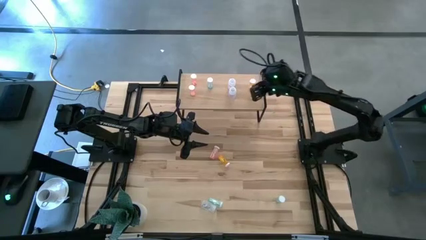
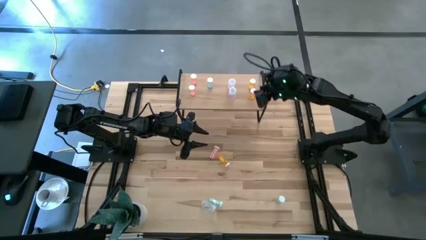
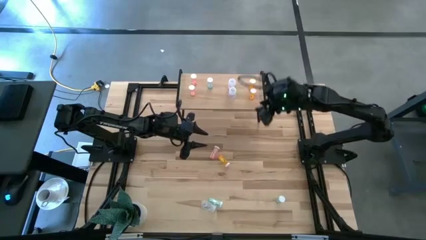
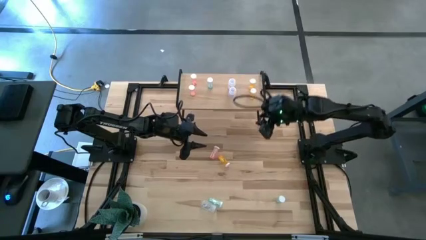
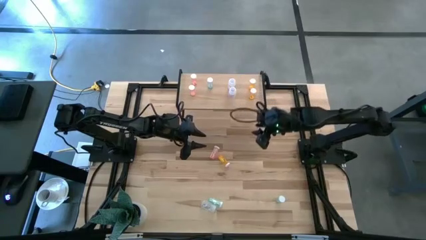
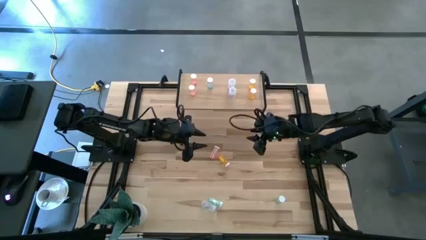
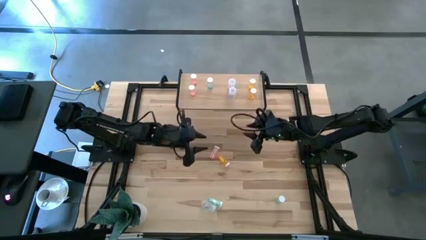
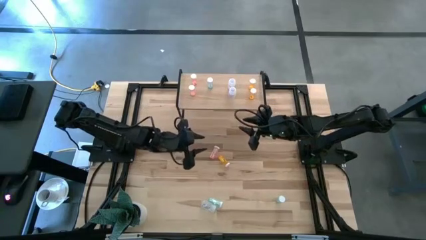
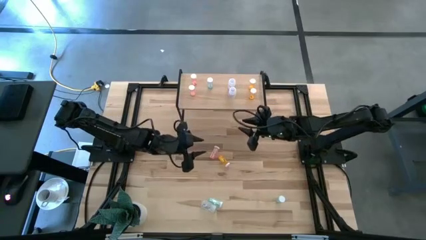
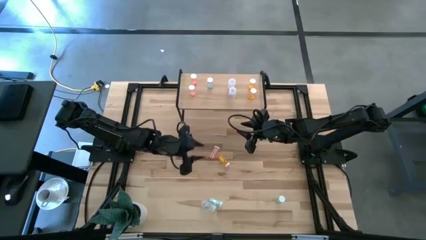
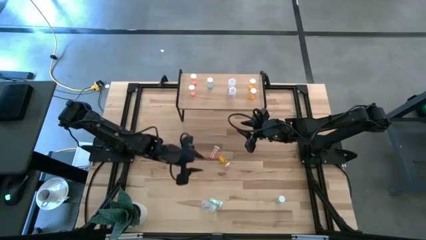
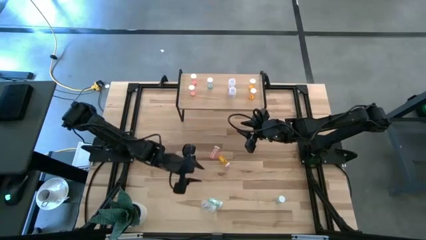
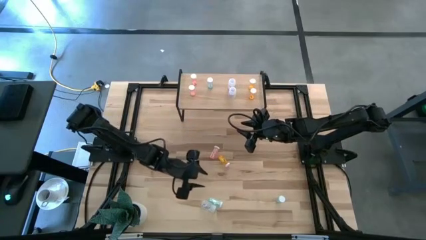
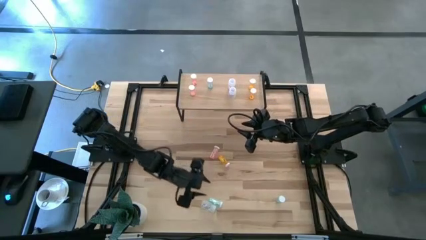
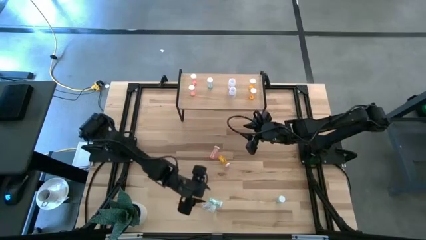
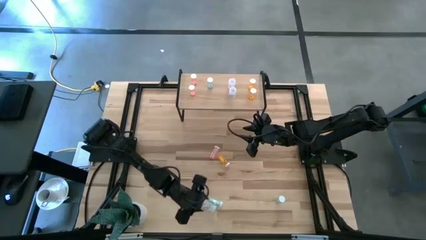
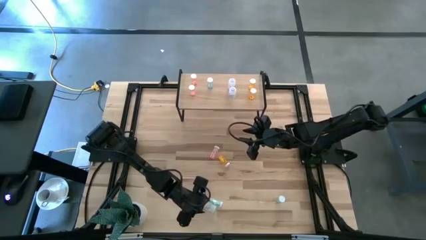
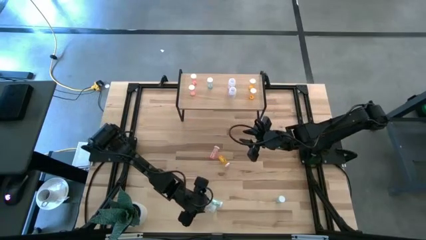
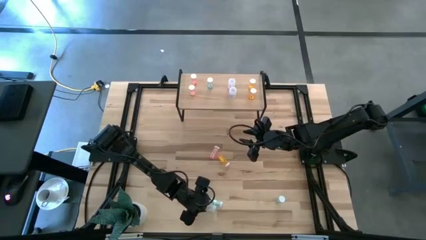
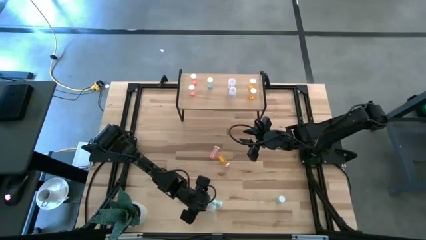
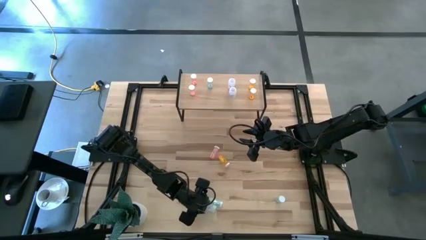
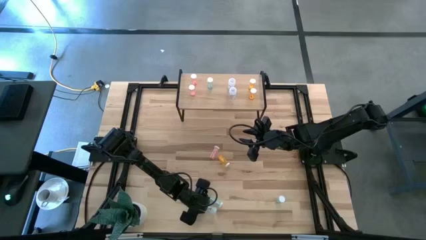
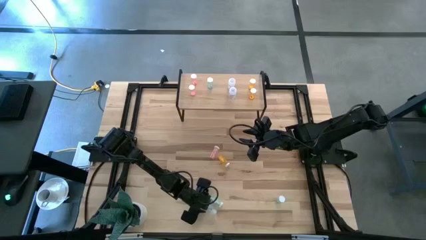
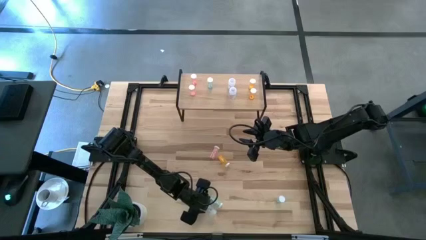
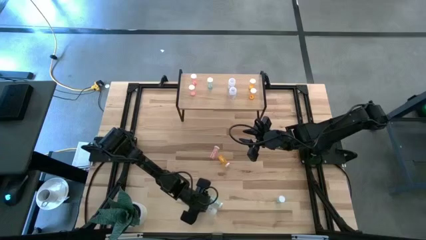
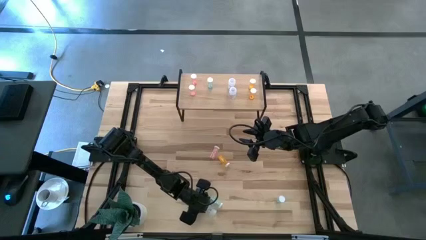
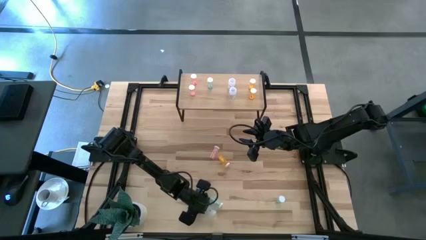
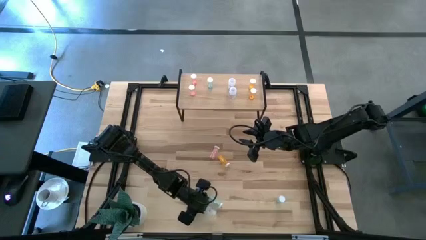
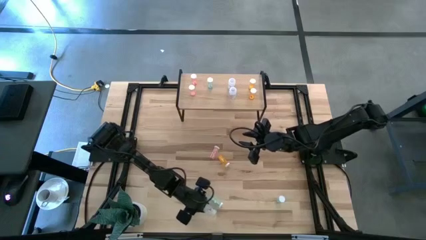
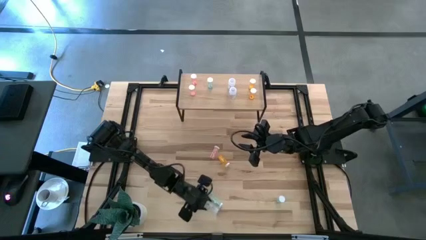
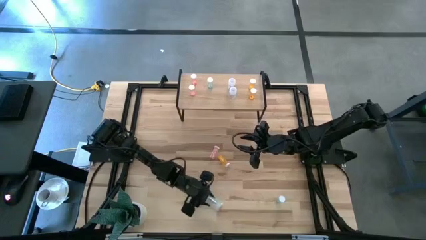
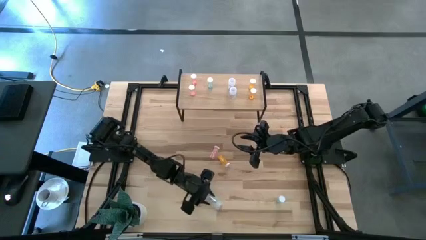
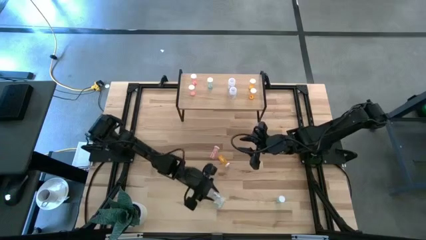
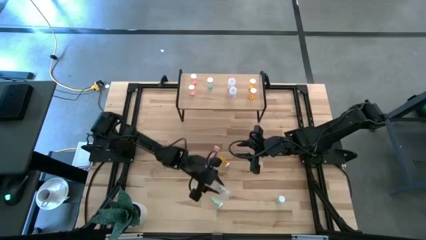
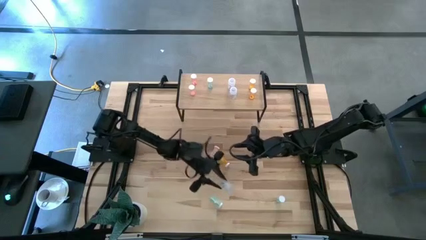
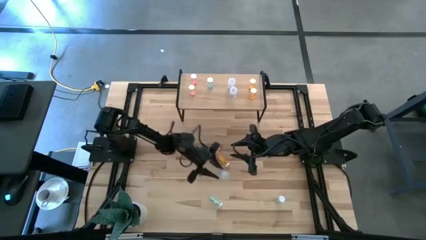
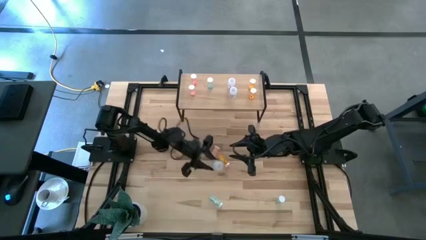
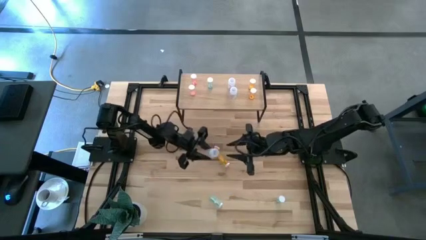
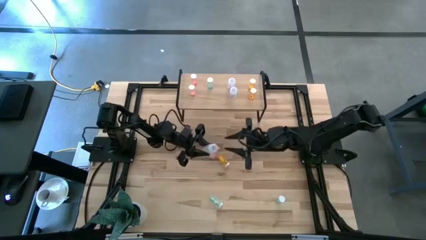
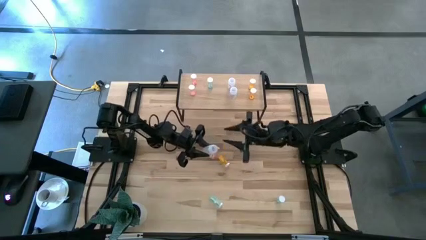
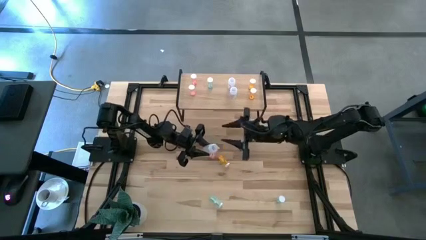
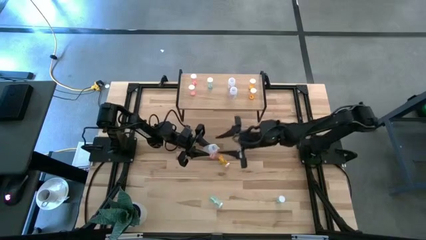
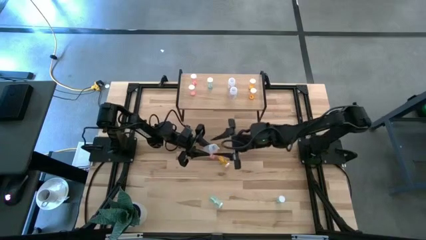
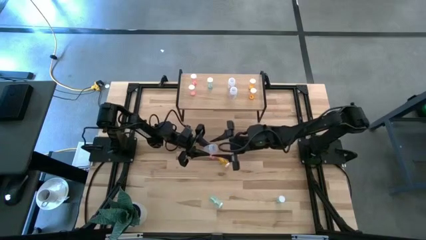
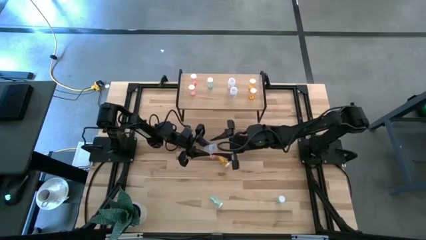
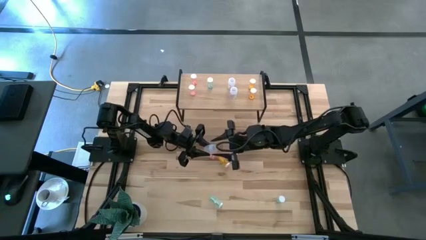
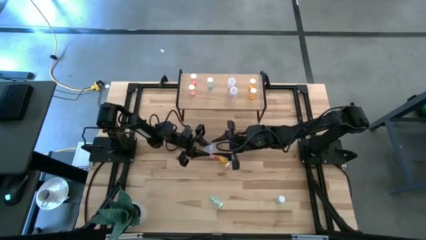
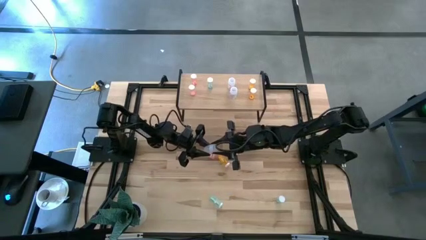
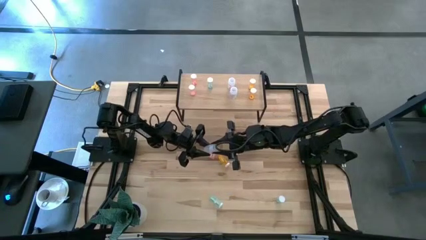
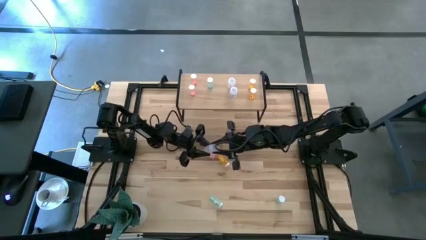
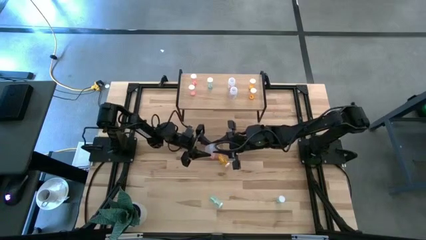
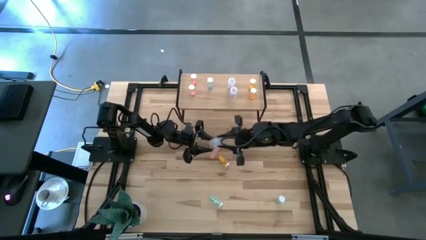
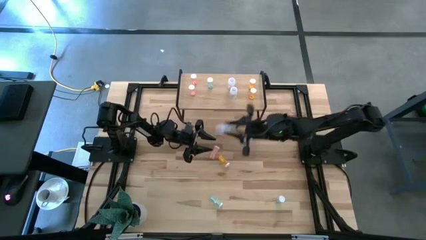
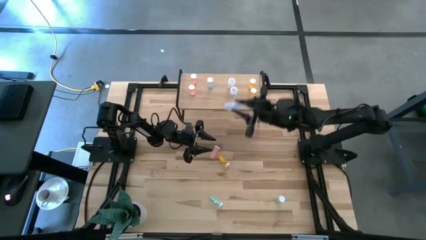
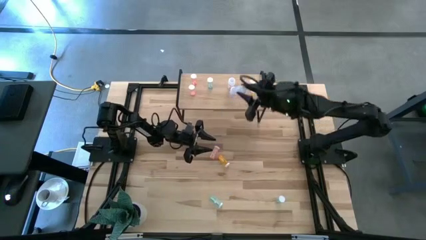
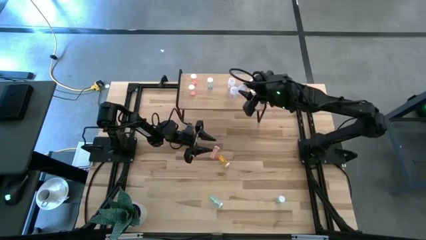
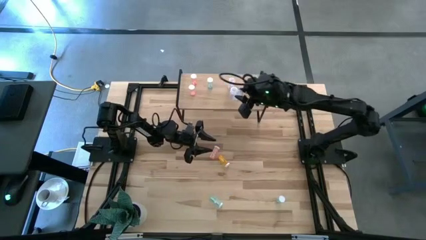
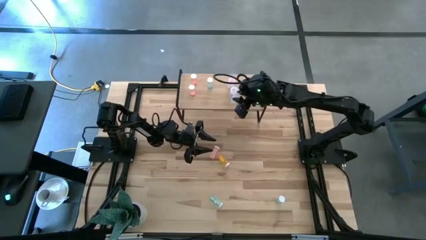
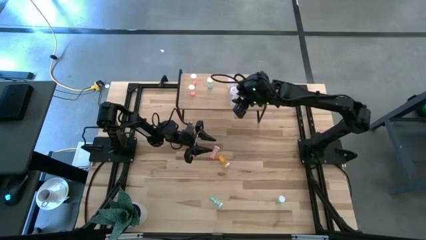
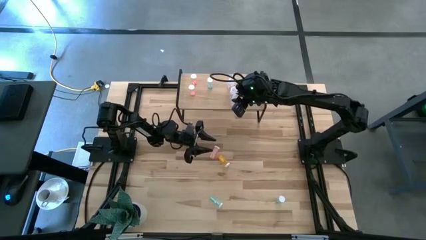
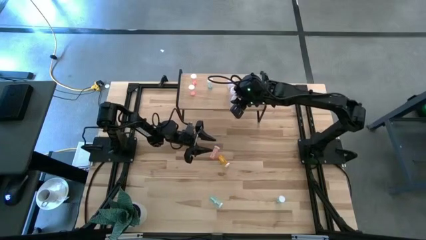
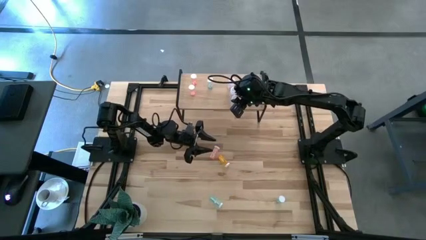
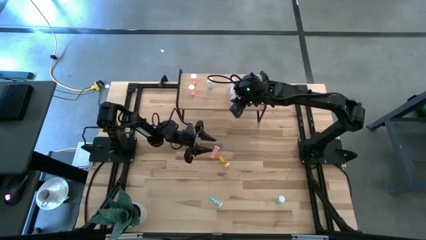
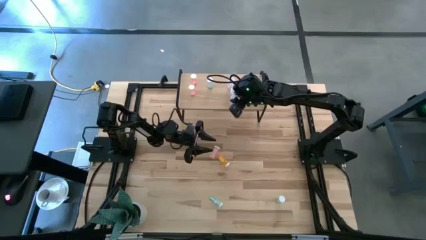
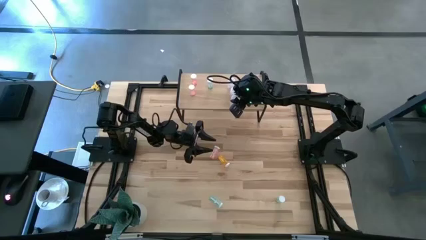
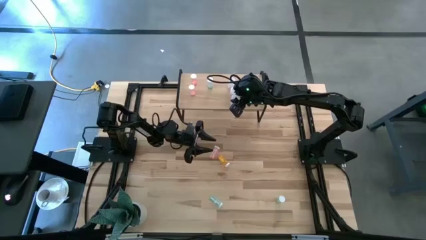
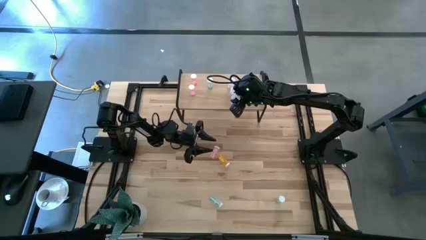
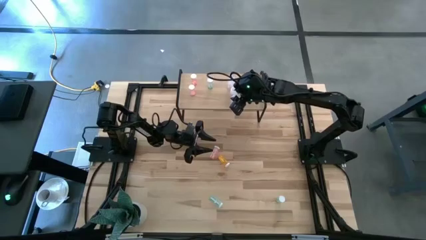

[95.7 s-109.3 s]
Task: Pick and place medicine bottles onto shelf by color
Put the transparent pill bottle on the shelf aligned with the other transparent pill bottles
